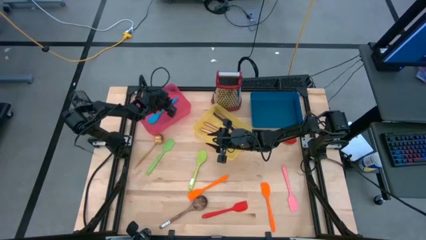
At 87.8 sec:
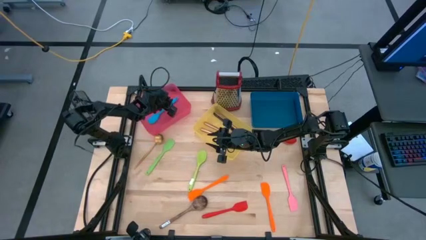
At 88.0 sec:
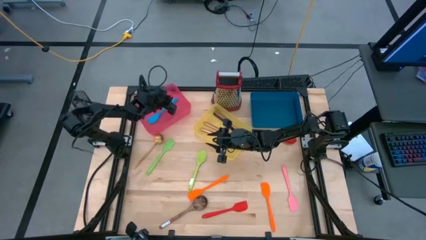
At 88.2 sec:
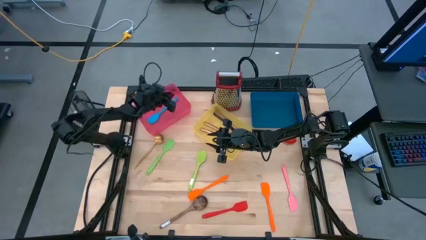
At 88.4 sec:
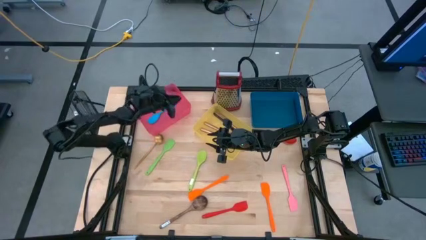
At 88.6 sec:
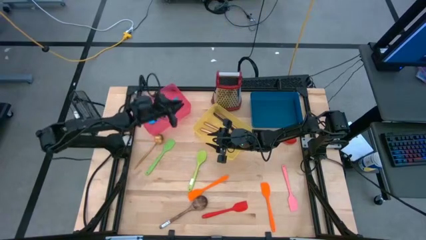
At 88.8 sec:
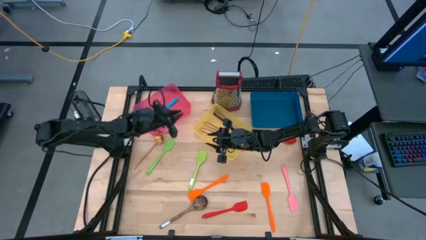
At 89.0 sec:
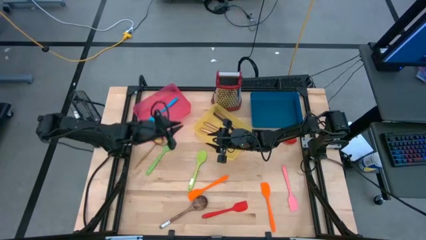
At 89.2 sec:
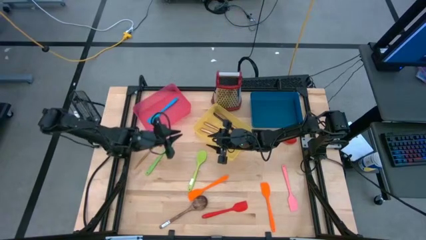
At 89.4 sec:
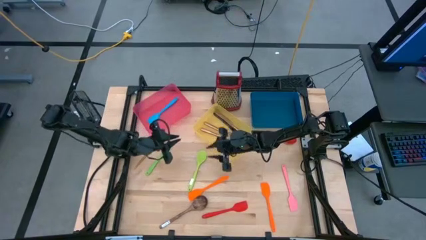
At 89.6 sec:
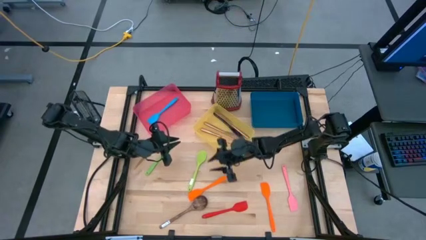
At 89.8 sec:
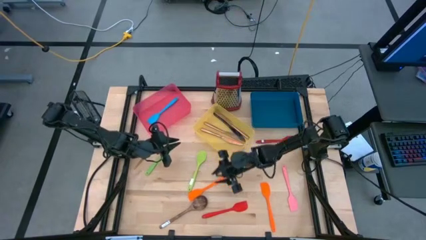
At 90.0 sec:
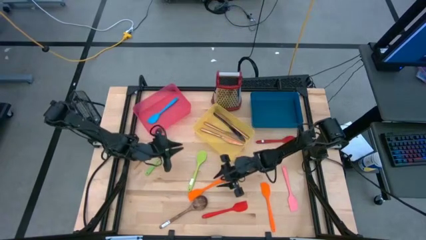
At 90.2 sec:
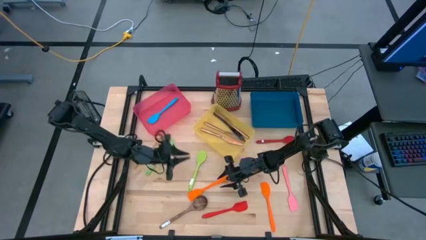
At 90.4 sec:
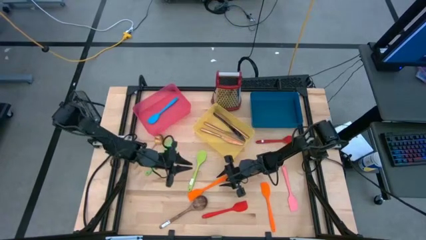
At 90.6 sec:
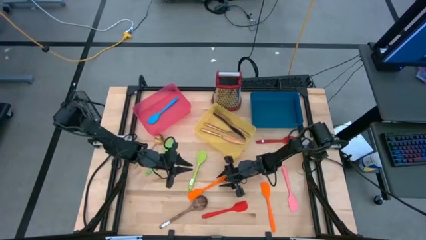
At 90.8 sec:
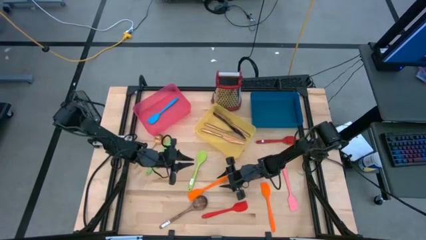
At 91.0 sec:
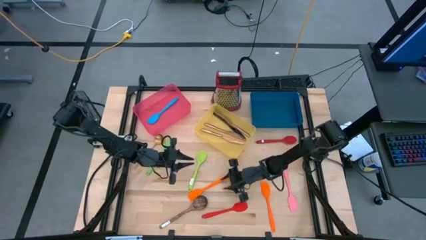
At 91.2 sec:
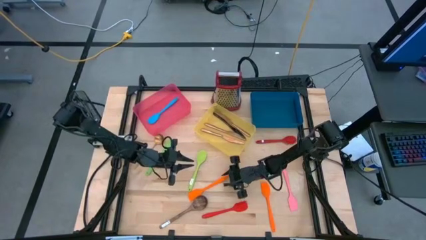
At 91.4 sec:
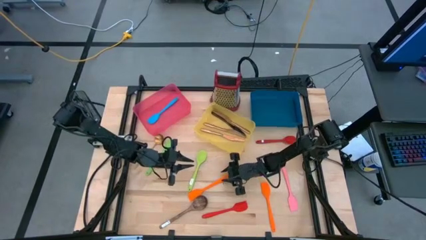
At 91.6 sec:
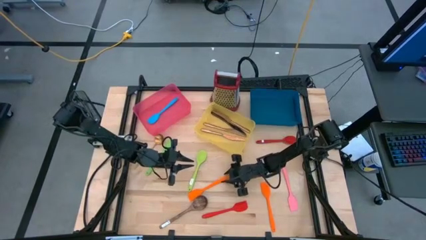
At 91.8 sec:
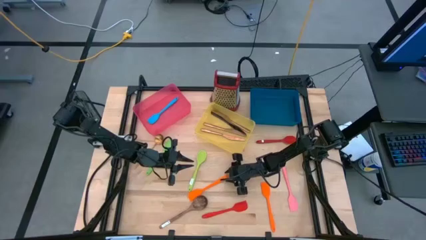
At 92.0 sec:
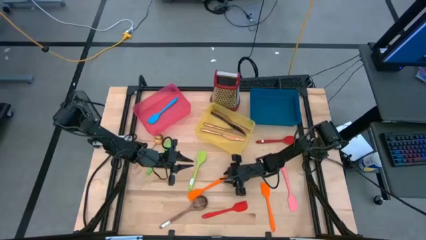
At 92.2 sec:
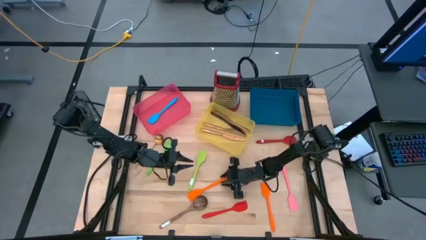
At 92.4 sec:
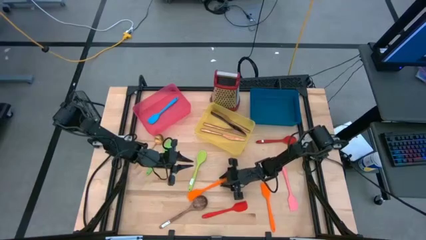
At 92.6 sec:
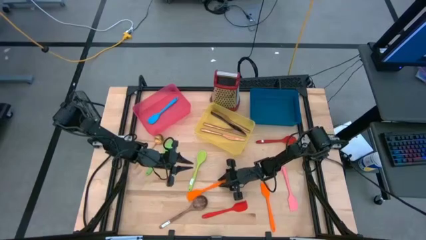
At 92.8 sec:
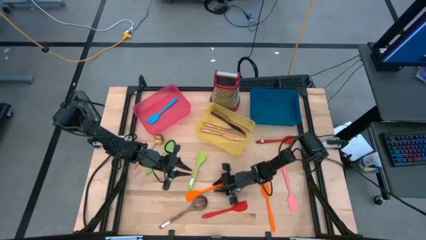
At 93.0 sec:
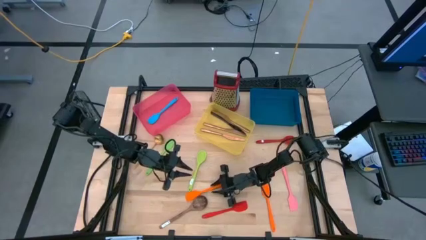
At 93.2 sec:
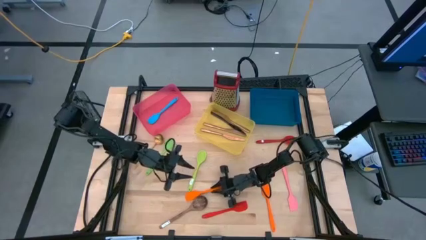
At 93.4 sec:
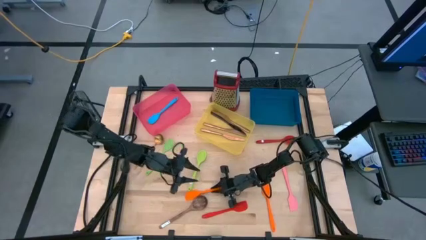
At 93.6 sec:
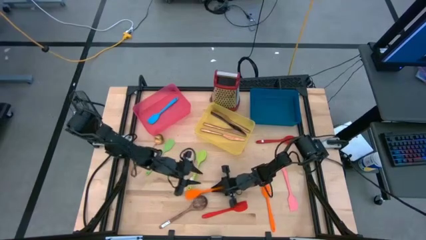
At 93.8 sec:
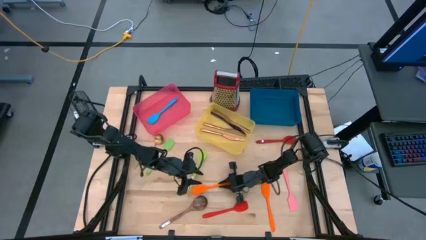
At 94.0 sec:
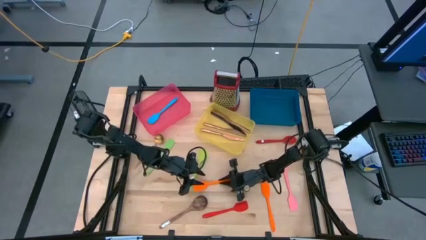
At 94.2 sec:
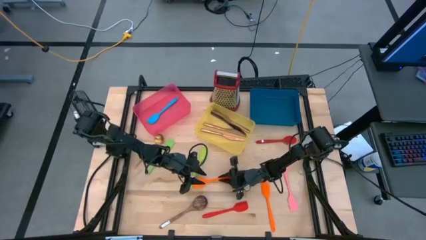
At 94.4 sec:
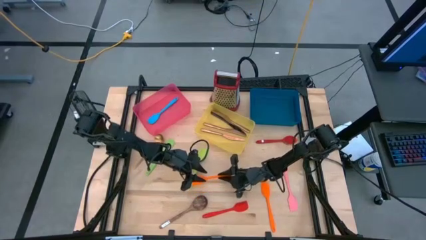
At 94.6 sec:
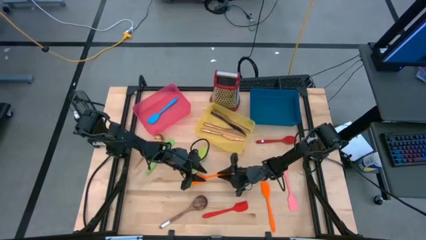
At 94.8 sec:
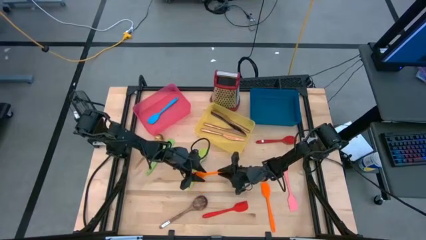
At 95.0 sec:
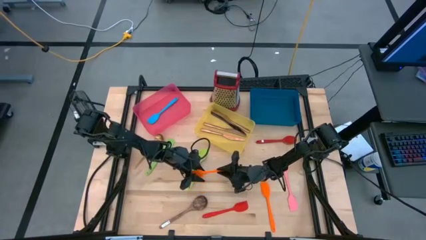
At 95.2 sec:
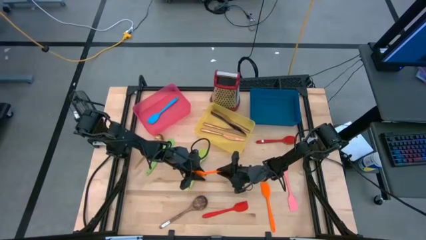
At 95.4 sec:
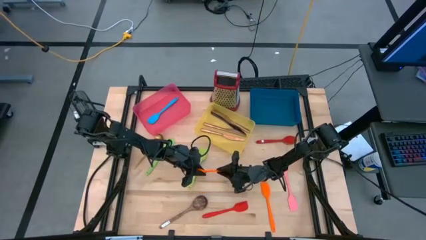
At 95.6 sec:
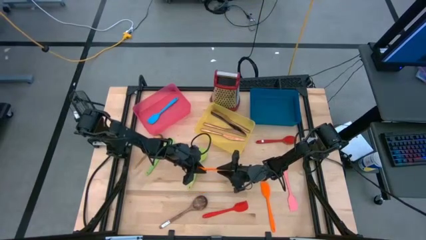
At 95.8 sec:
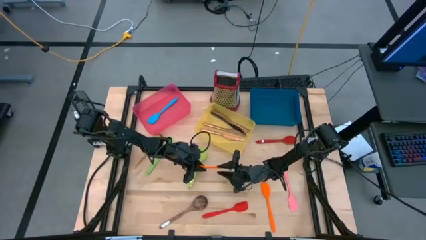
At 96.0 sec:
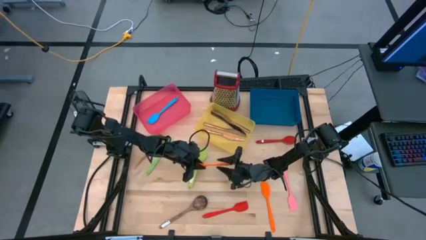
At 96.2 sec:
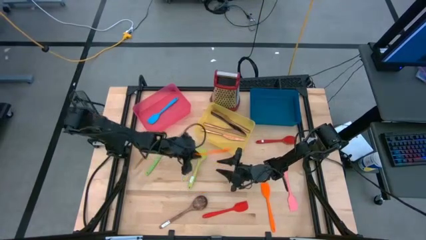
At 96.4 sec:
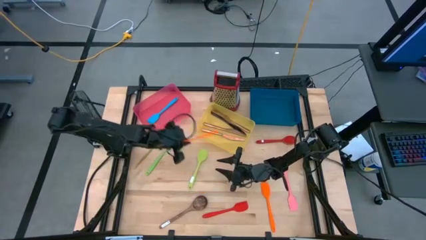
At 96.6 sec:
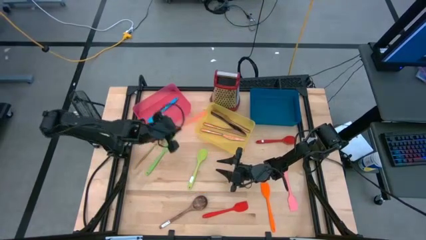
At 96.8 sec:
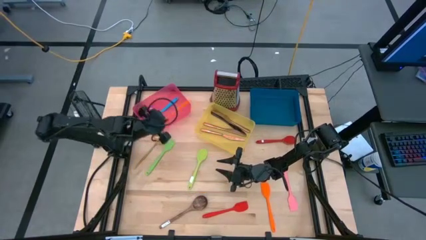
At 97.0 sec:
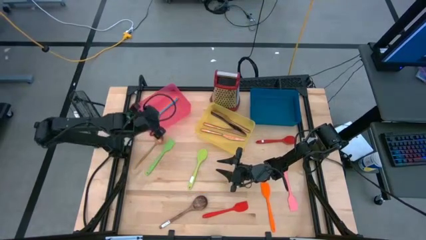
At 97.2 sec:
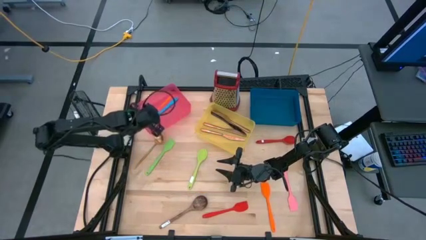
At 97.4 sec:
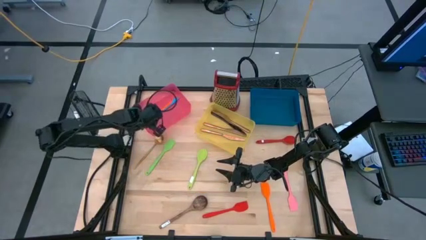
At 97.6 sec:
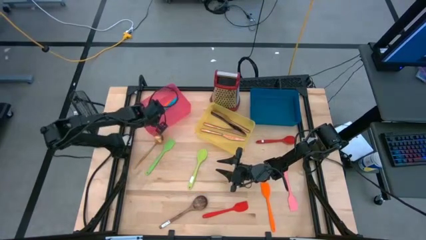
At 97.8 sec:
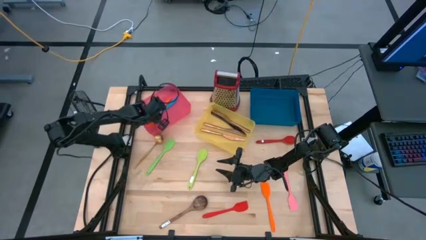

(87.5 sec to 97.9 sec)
Task: Pick & Place Kitchen Items
Put the orange spatula into the red bin

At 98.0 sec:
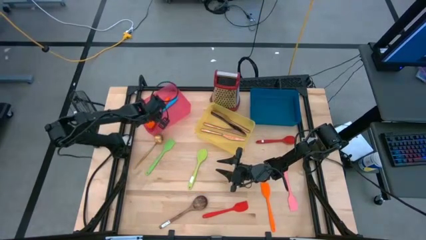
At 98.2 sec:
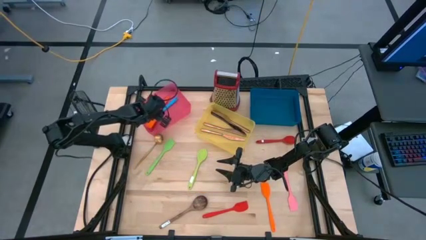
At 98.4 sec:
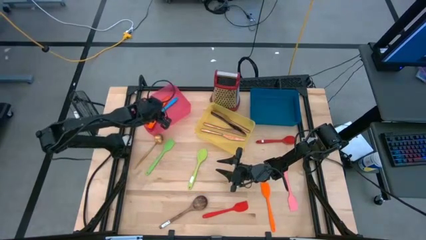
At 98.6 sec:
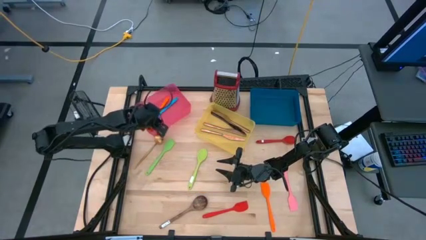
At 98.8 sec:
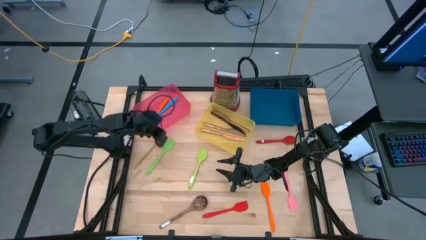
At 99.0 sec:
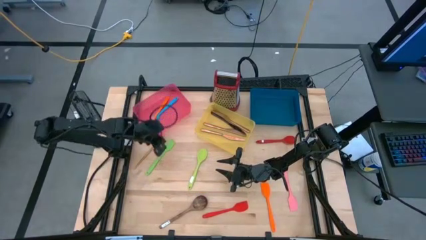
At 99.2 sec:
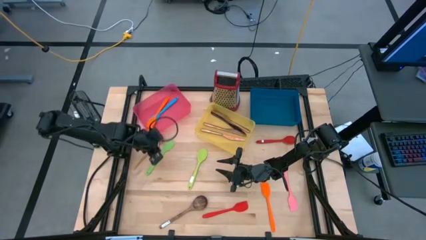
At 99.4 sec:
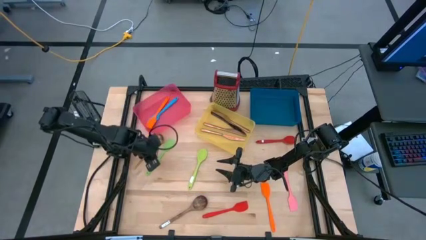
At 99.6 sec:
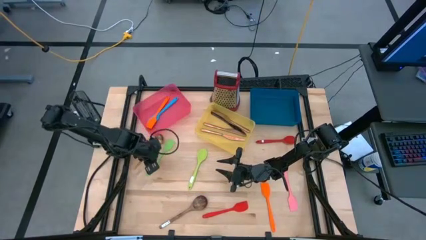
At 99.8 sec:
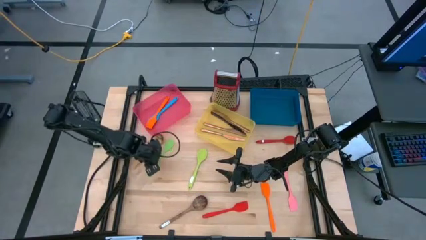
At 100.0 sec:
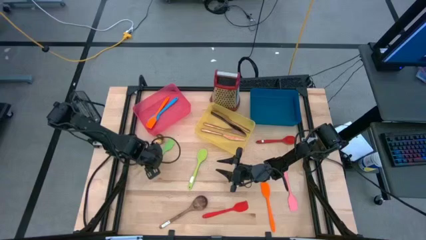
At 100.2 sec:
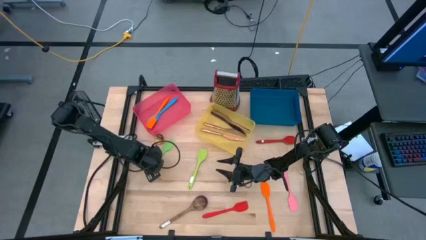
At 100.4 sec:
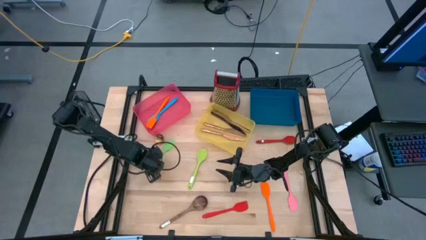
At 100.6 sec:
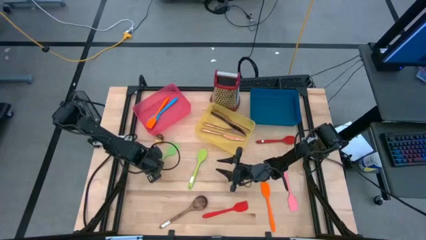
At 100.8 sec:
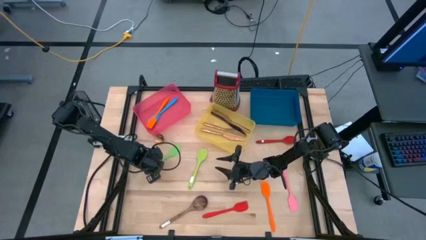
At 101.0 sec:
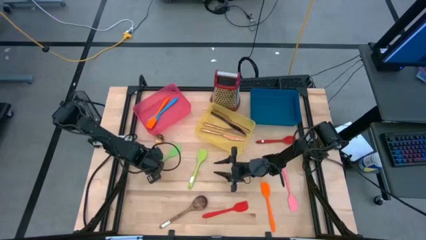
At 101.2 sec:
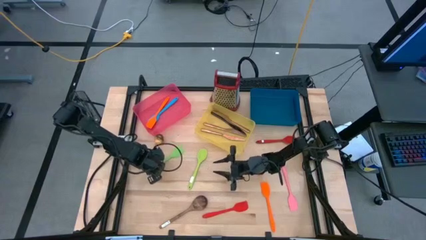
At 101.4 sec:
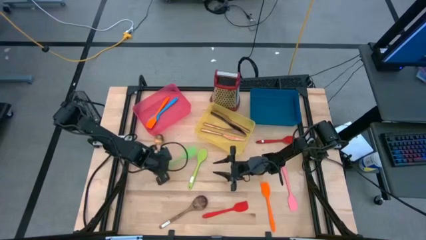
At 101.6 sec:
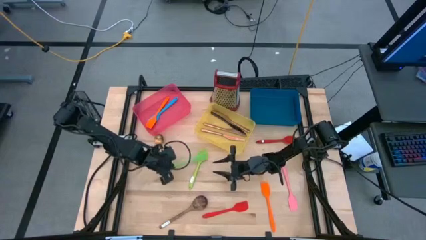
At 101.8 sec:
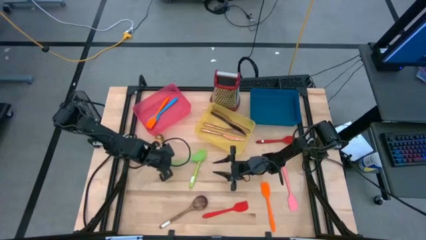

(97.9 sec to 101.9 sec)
Put the green spatula into the red bin

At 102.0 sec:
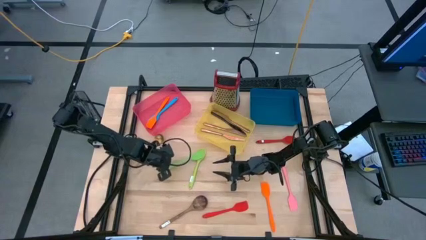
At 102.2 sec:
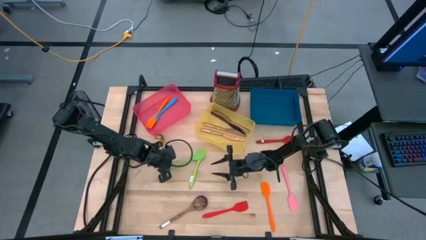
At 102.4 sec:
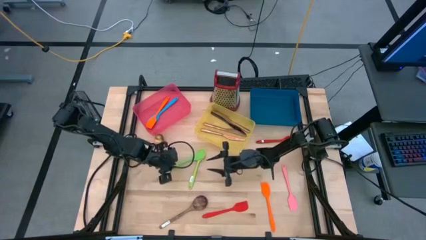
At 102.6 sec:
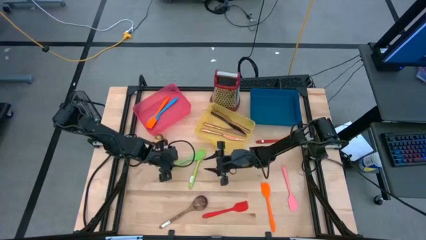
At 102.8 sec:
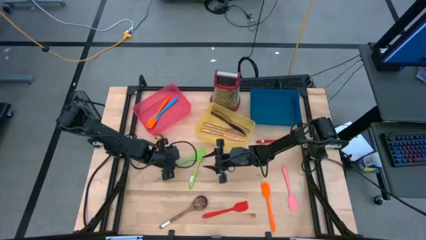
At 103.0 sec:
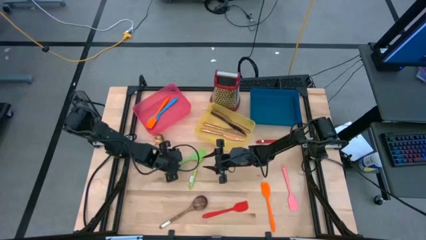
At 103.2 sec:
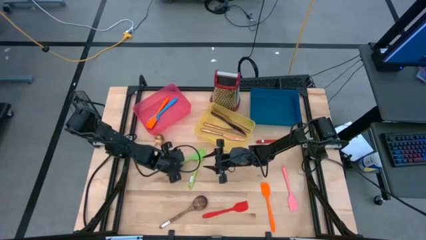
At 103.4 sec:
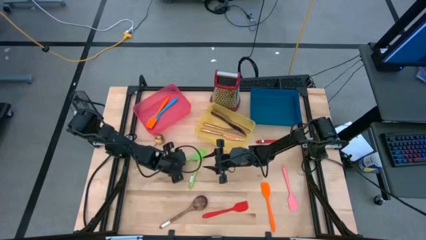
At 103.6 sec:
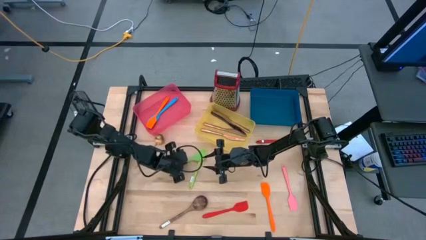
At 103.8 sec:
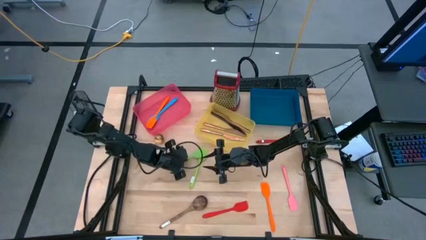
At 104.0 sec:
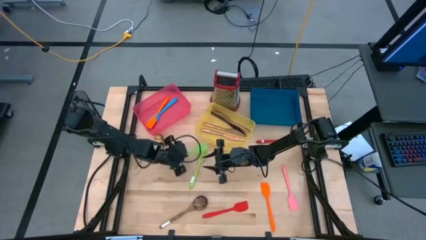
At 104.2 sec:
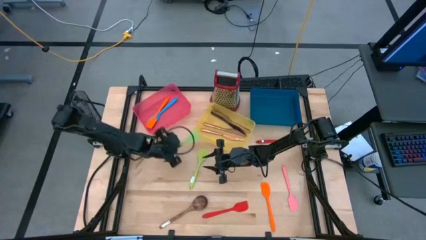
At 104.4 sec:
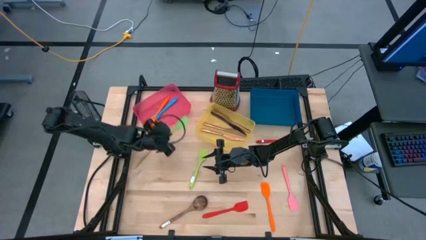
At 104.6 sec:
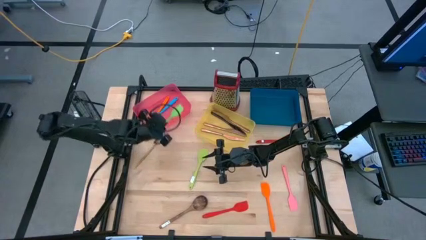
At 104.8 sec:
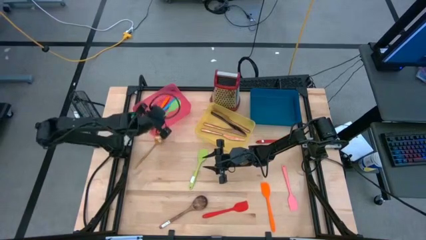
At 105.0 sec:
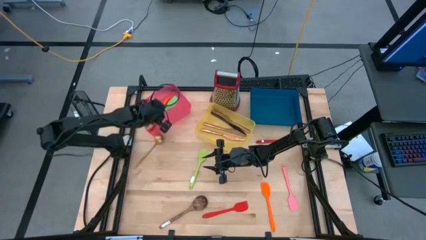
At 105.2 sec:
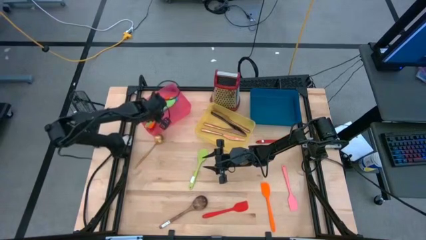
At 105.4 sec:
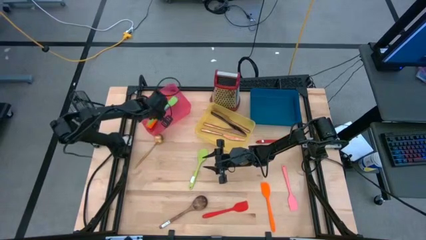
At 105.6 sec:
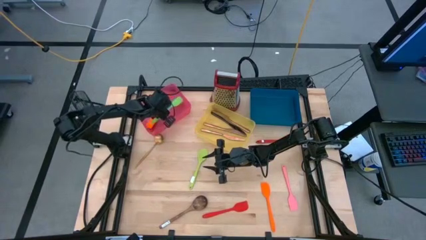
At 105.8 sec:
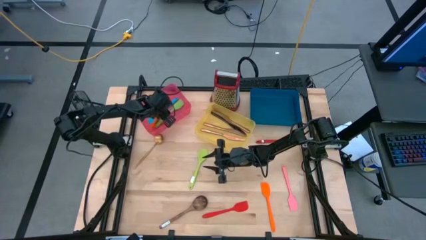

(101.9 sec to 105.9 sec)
Put the green spatula into the red bin
